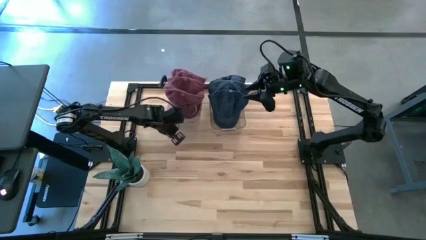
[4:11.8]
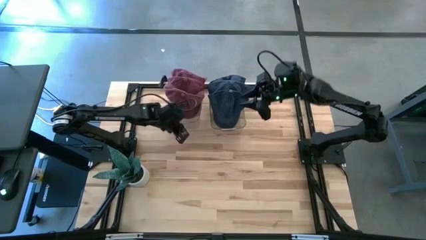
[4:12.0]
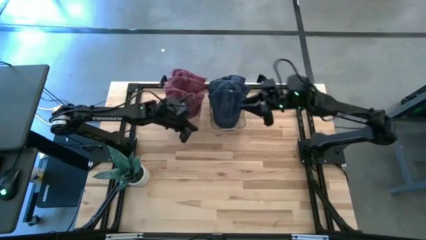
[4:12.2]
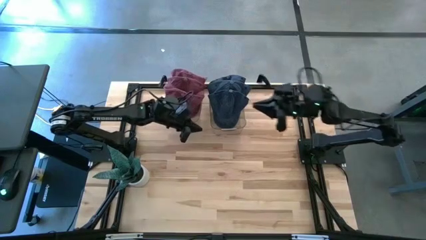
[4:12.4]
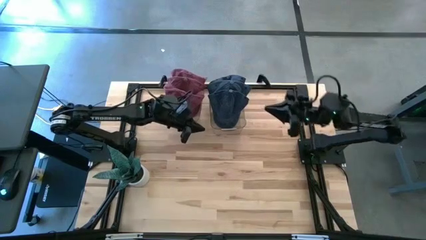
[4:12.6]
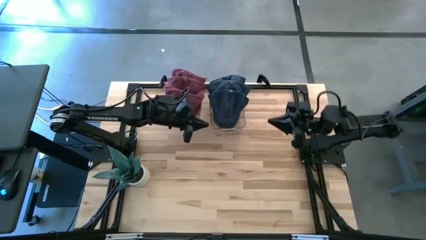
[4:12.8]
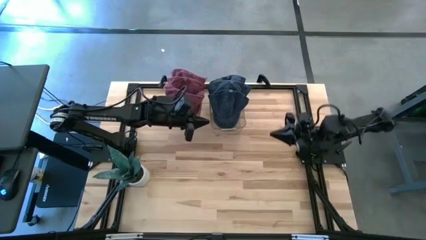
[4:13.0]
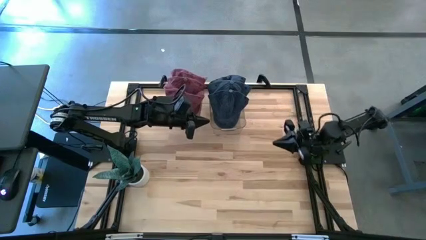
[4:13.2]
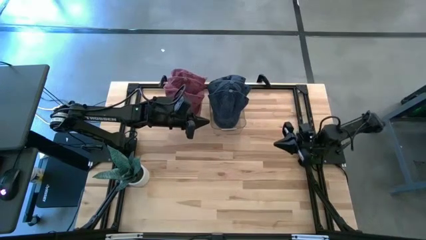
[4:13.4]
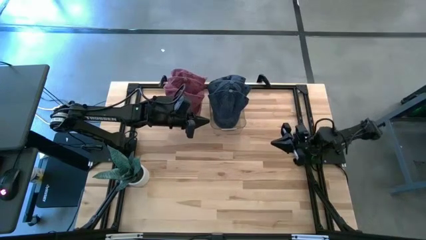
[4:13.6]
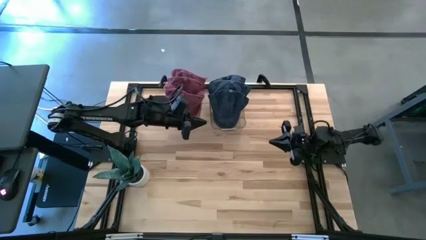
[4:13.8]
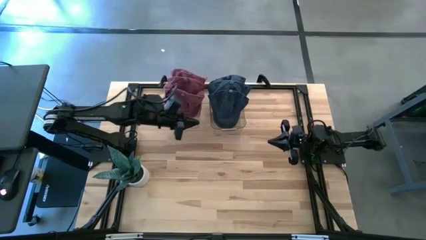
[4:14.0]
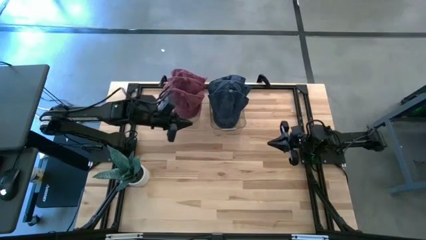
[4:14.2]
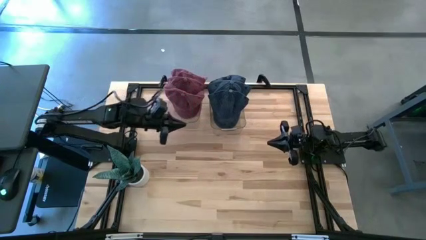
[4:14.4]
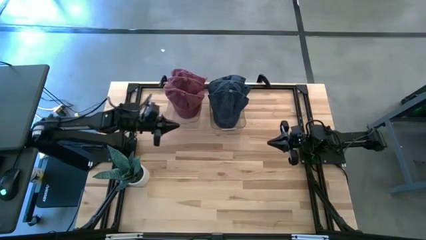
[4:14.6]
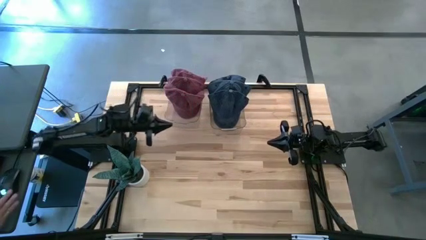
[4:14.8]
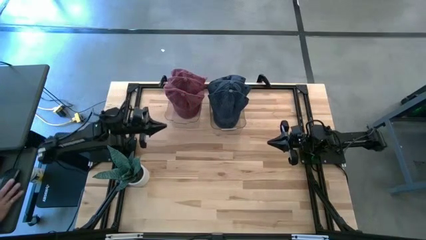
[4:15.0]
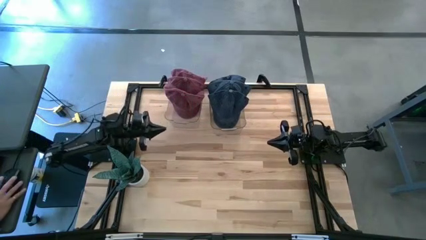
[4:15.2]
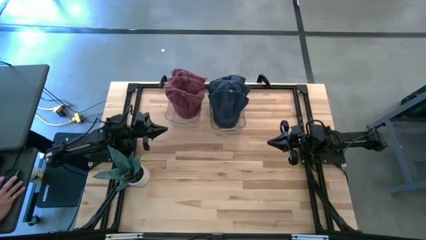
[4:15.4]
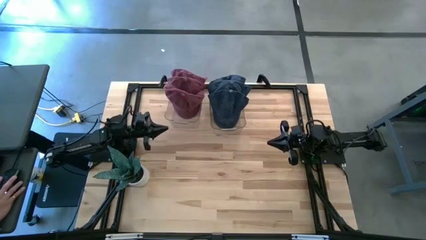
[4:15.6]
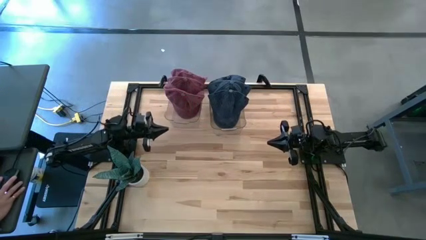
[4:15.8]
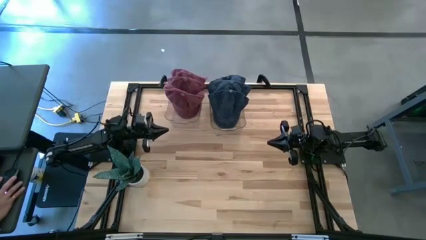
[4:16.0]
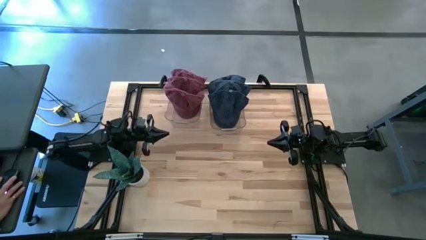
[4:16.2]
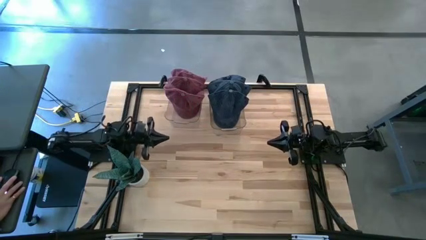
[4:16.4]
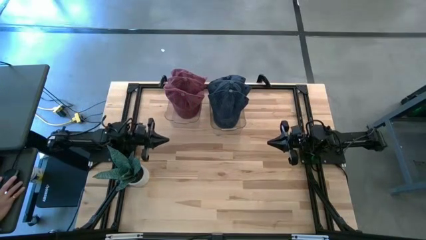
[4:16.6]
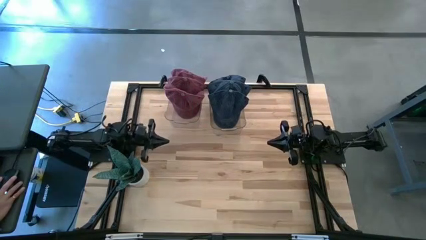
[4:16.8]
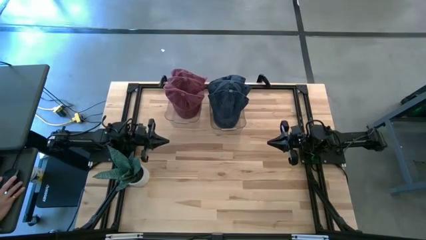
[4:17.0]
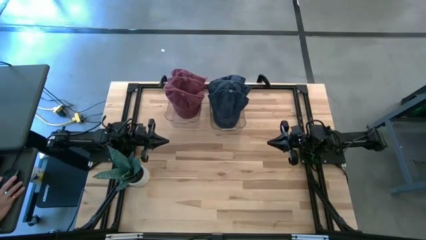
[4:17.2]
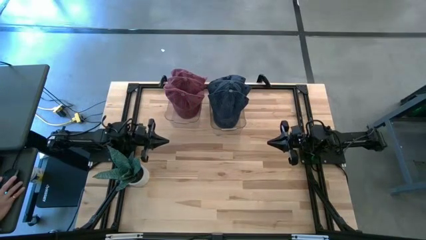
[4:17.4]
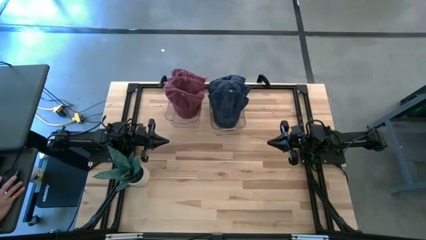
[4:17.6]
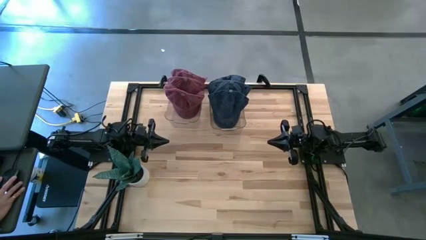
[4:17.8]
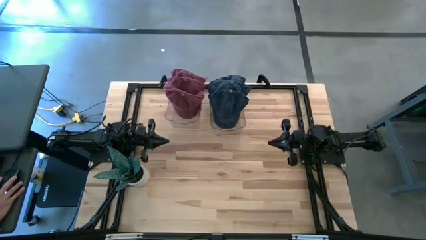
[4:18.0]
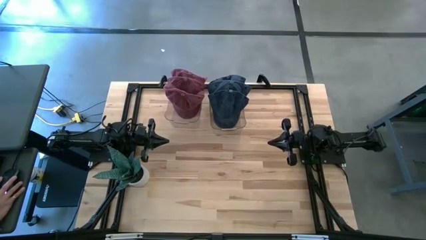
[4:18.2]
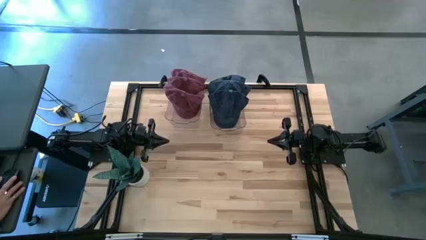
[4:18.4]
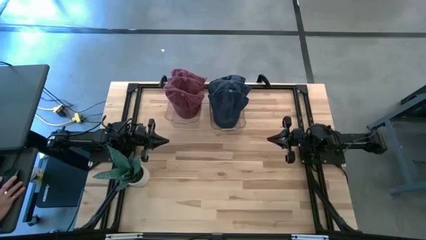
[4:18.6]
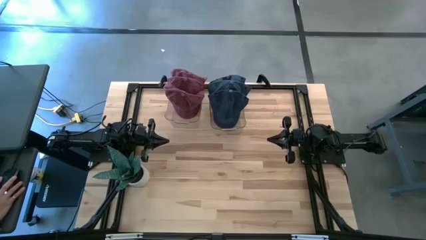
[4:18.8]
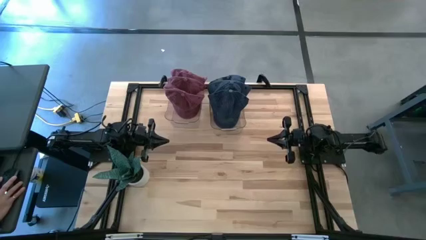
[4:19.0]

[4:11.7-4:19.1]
Task: Pick & Place hat
Return to Home Position

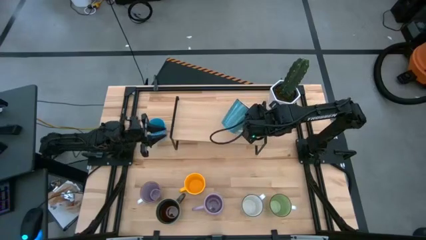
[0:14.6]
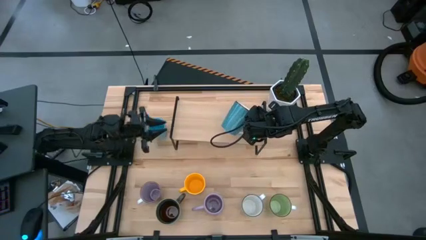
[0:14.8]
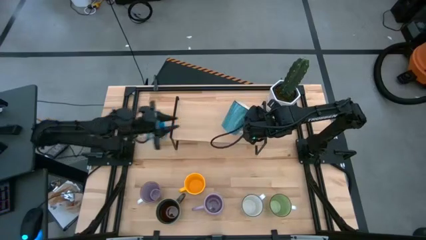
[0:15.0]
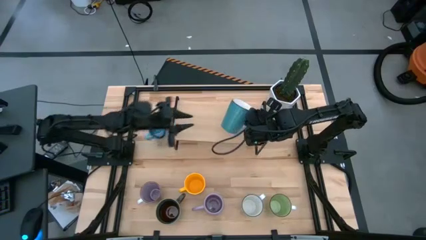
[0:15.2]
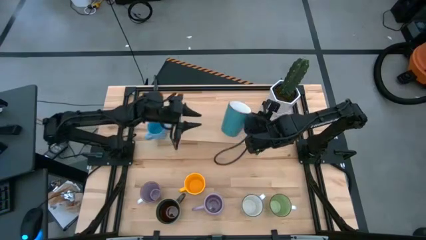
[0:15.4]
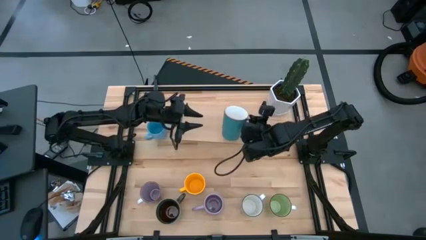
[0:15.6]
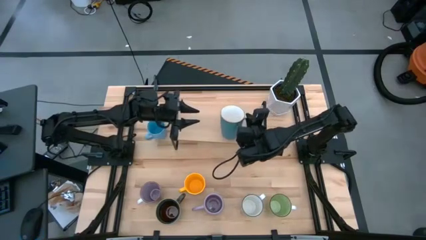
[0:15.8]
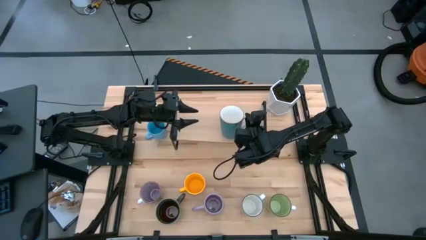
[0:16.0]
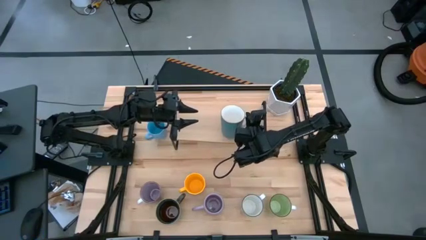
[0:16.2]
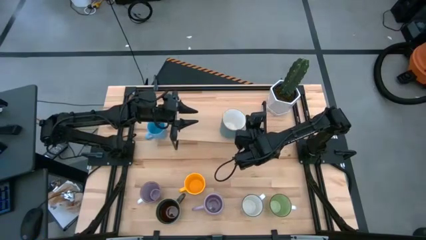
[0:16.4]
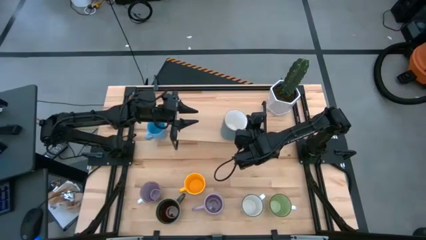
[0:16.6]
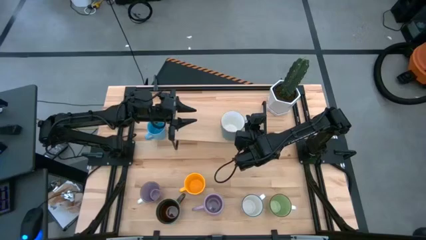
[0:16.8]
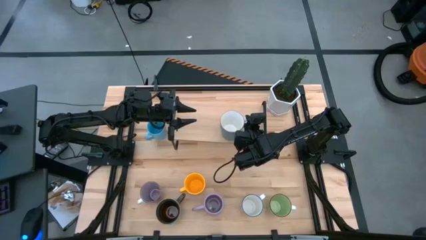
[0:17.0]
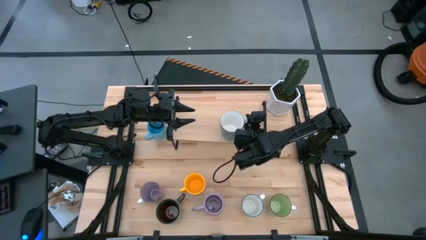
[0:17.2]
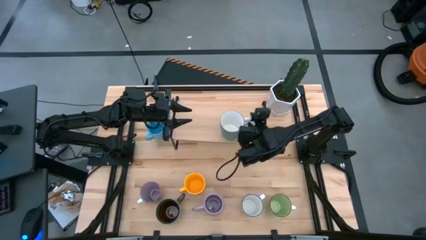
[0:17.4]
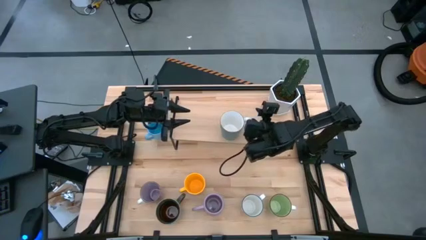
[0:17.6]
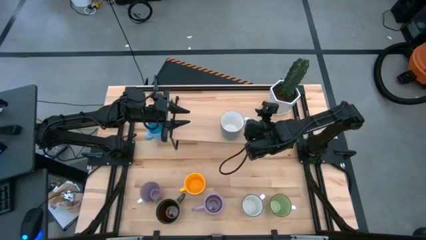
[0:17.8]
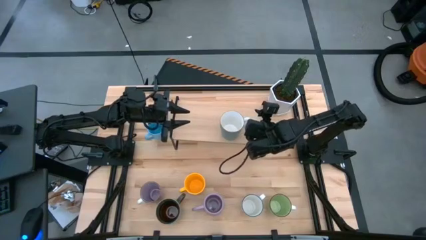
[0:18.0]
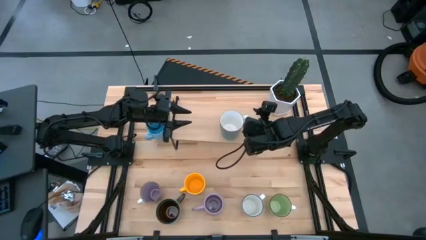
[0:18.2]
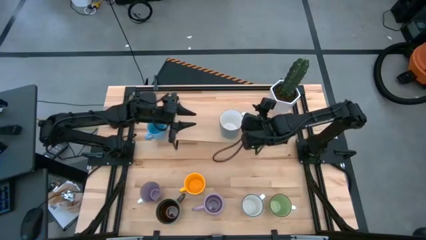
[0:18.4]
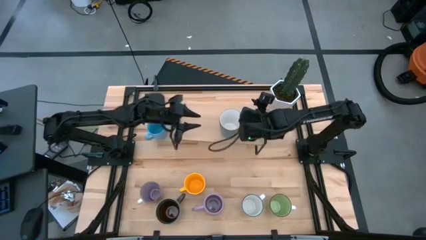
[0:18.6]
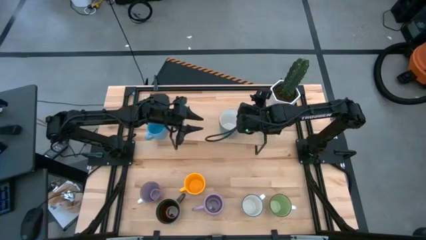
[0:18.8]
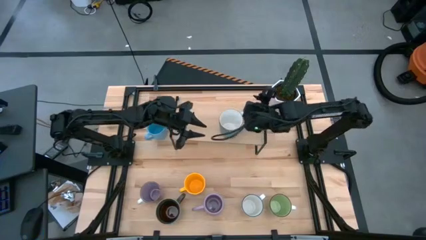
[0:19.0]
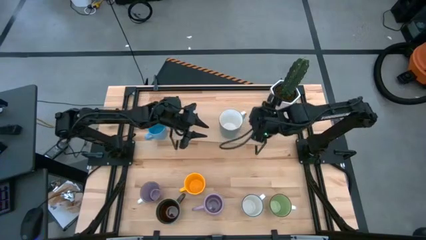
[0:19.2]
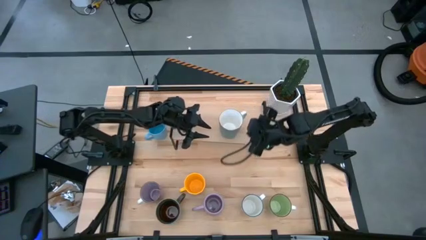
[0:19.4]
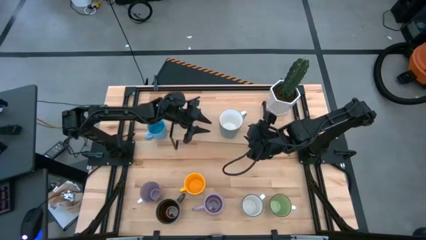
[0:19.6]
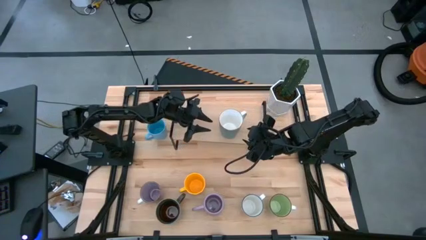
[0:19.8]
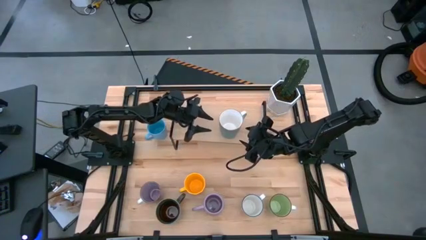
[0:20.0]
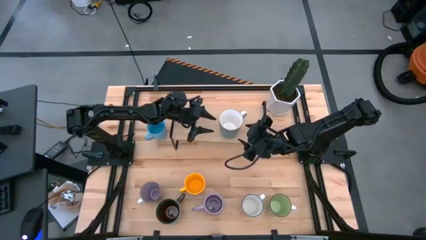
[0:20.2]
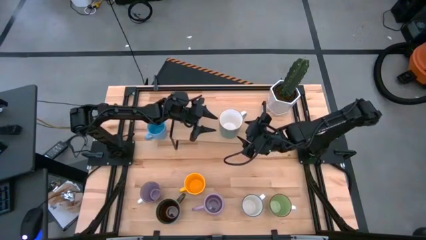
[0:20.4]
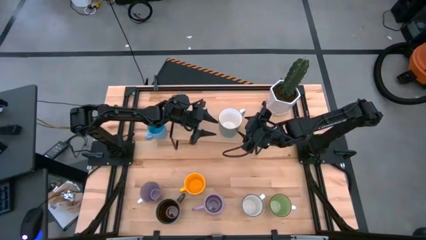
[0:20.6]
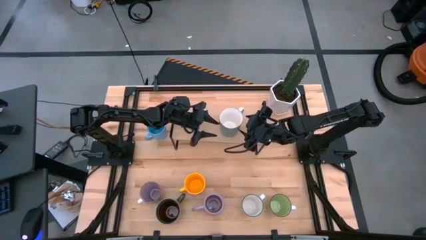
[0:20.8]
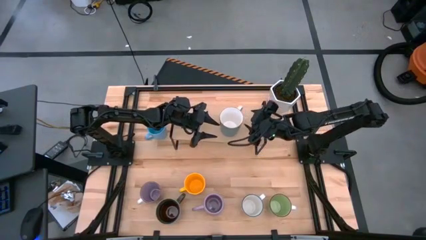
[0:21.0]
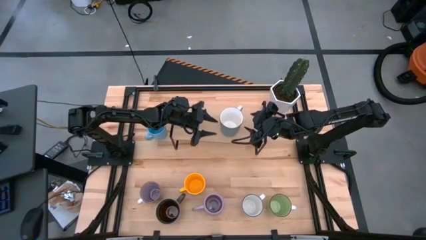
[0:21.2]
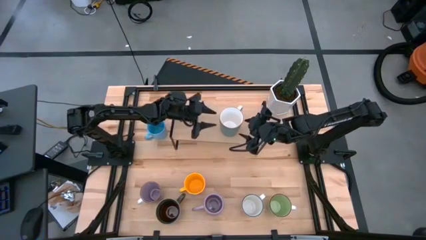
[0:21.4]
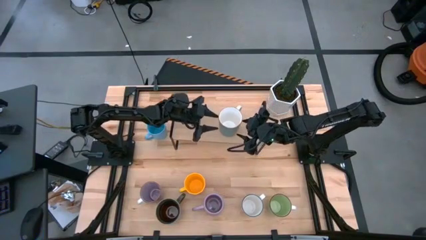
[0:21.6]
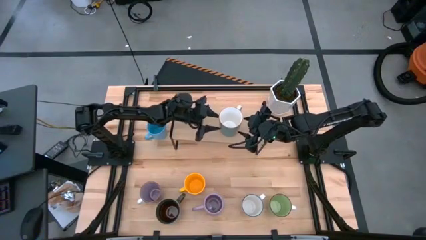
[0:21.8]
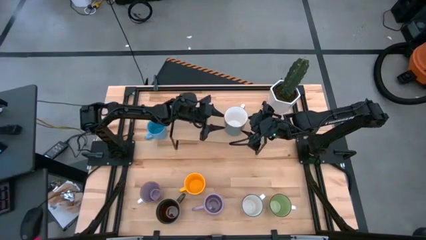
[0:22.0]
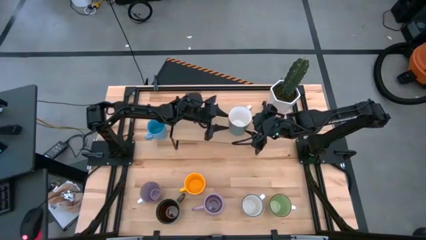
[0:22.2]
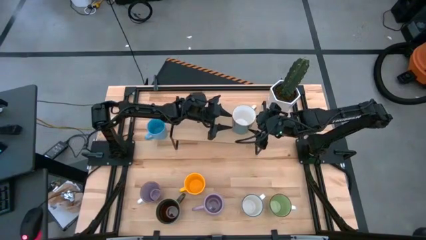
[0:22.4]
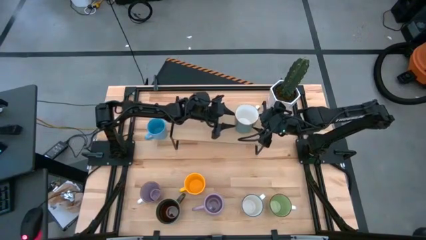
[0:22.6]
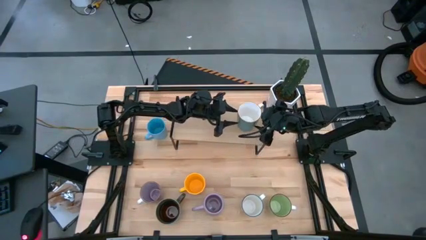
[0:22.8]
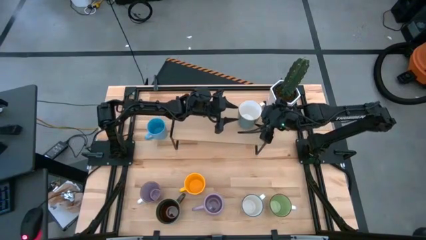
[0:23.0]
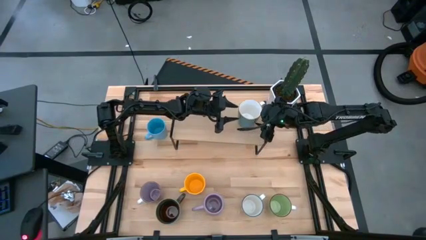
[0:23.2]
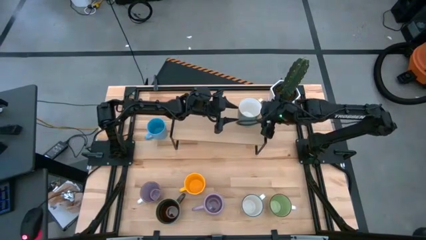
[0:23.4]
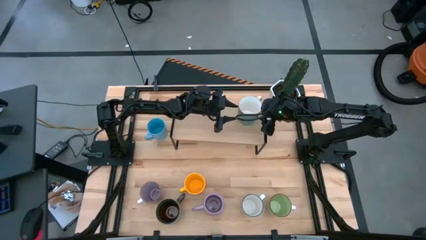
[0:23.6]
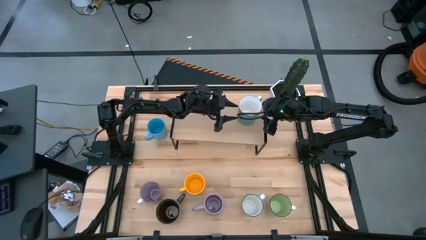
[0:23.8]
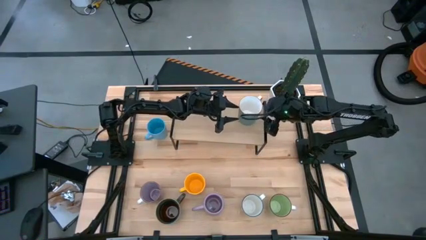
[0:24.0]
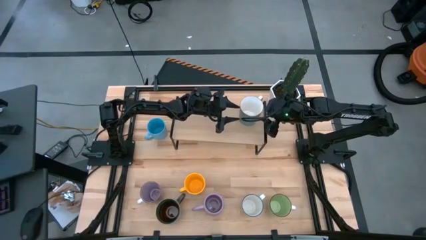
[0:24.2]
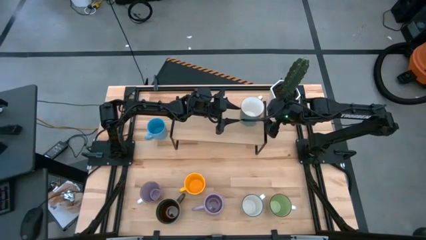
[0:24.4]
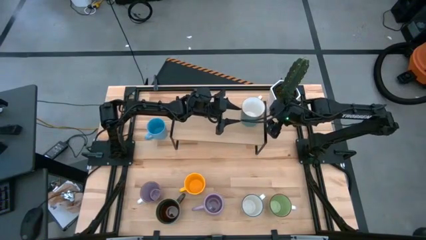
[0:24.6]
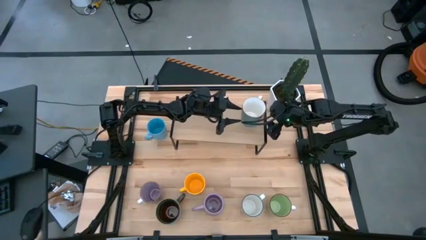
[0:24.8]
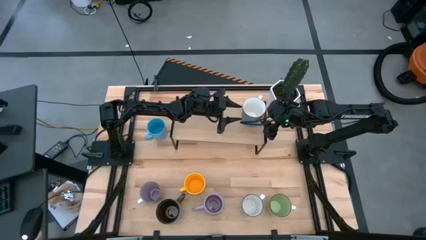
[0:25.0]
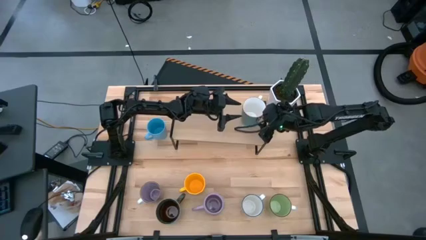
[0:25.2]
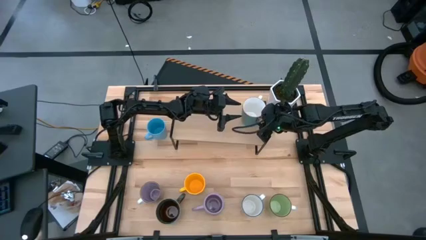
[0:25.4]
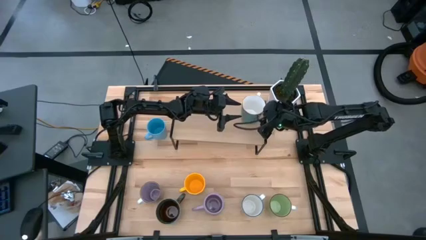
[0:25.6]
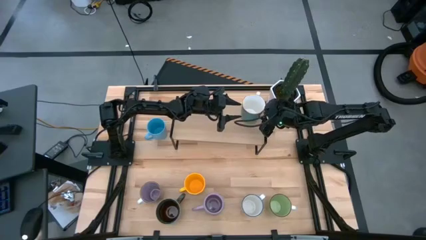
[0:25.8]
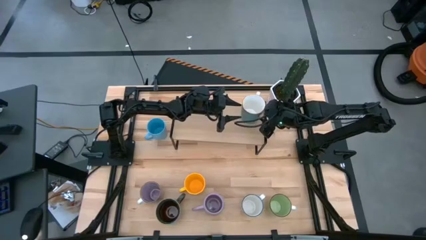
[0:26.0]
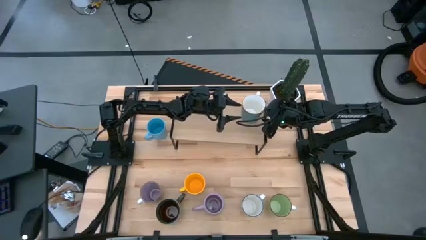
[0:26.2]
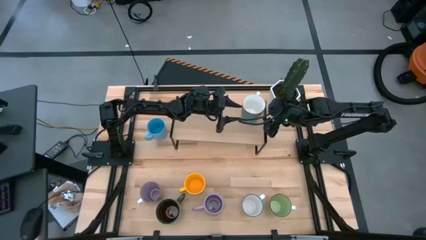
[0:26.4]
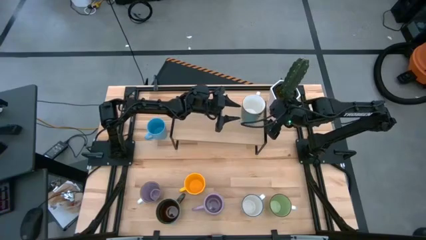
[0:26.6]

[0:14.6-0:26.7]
Task: Place coffee mugs
Put the blue mug on the shelf
